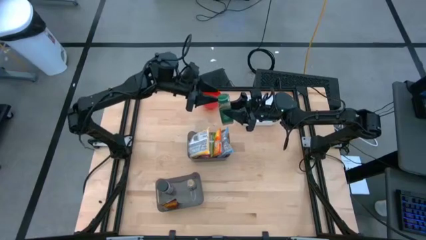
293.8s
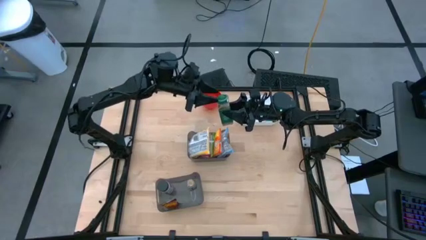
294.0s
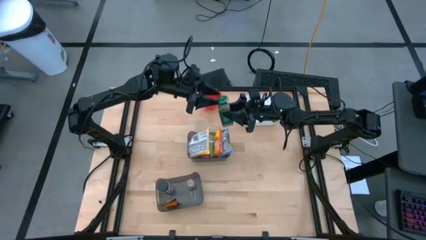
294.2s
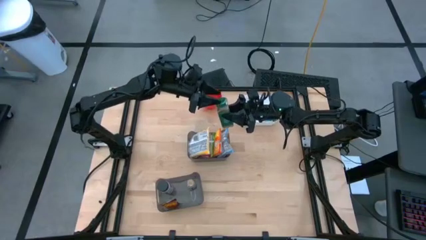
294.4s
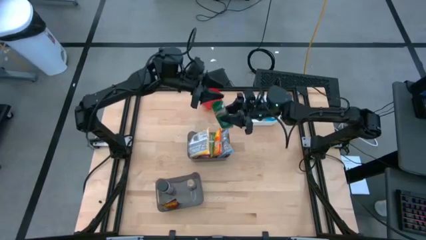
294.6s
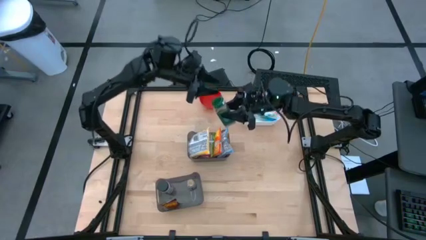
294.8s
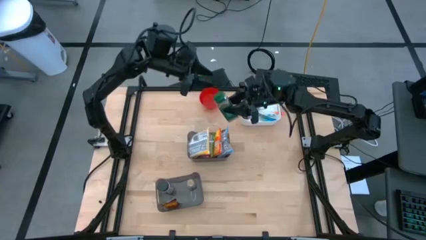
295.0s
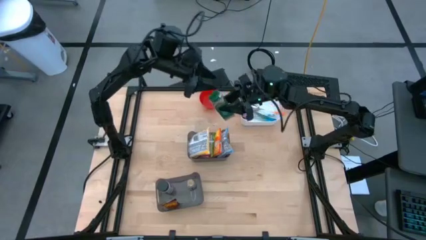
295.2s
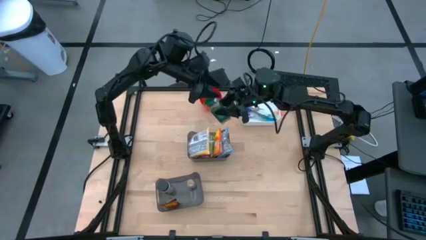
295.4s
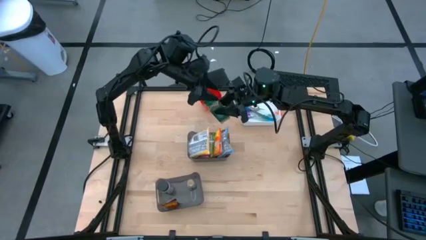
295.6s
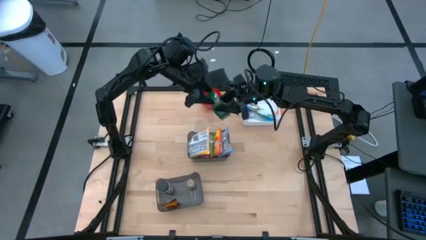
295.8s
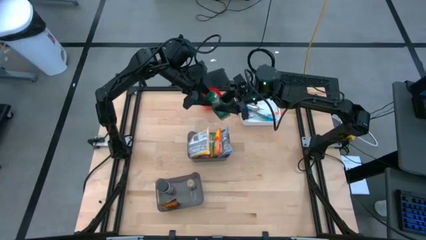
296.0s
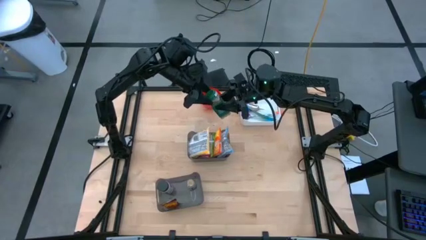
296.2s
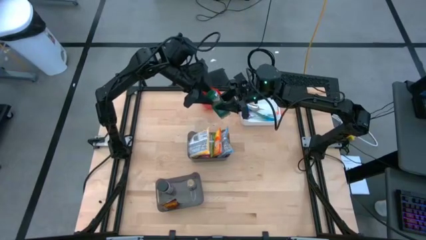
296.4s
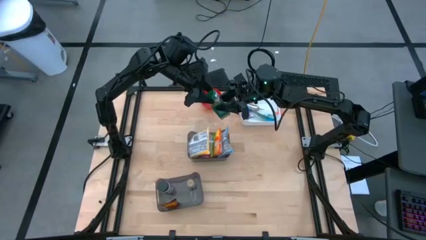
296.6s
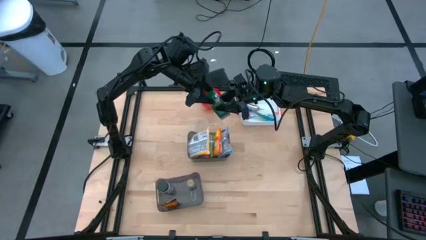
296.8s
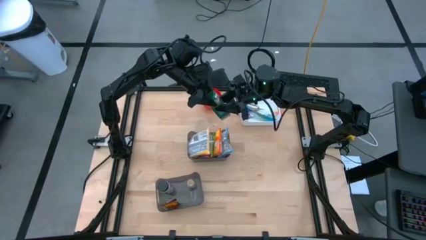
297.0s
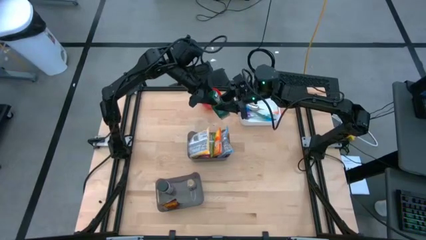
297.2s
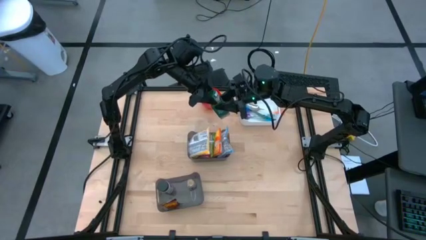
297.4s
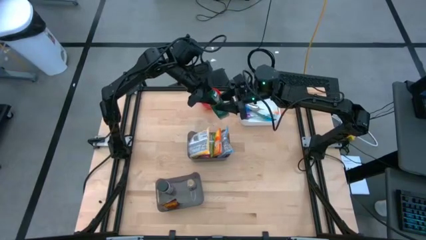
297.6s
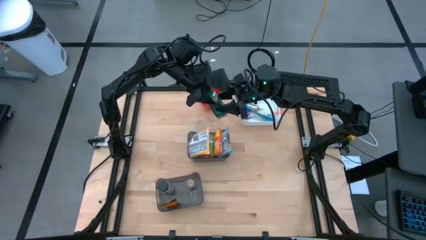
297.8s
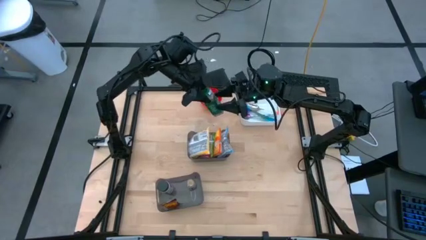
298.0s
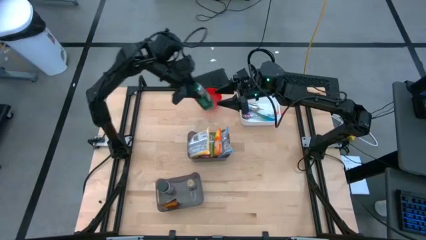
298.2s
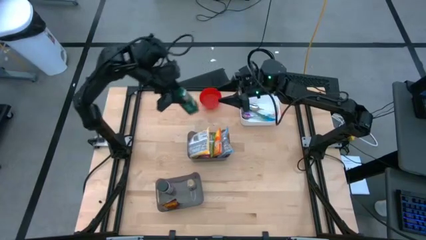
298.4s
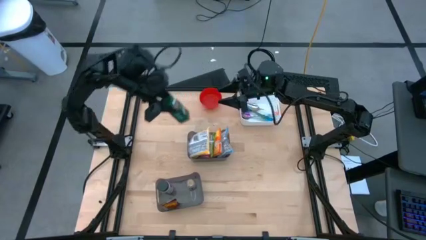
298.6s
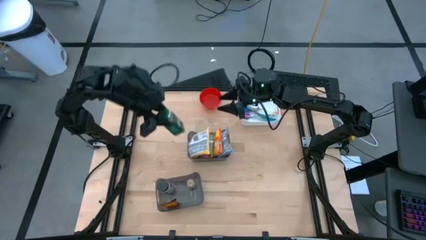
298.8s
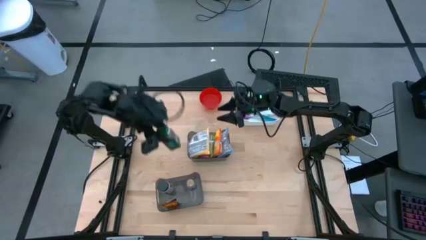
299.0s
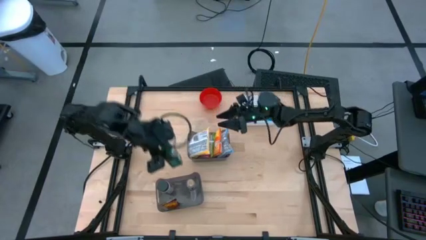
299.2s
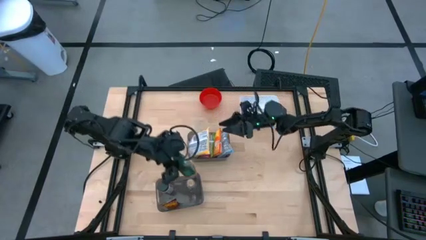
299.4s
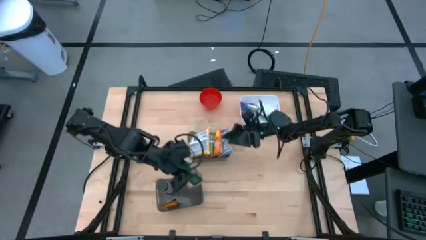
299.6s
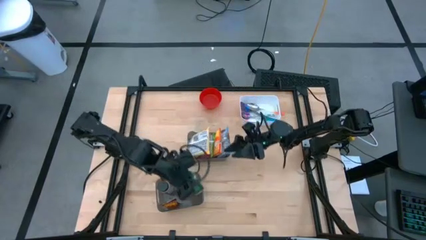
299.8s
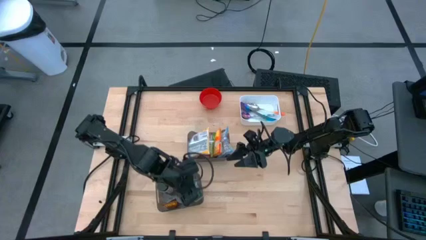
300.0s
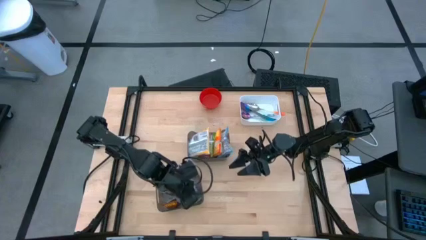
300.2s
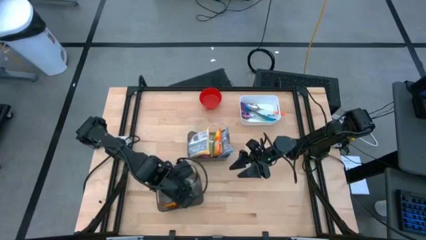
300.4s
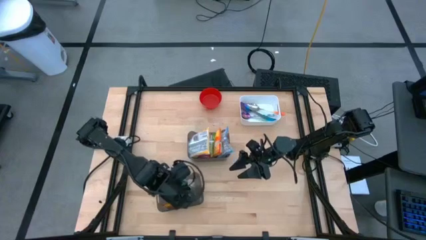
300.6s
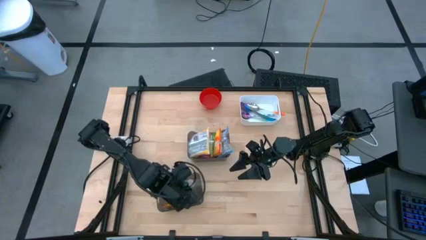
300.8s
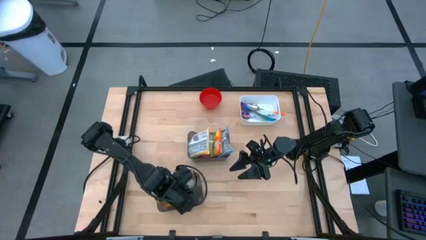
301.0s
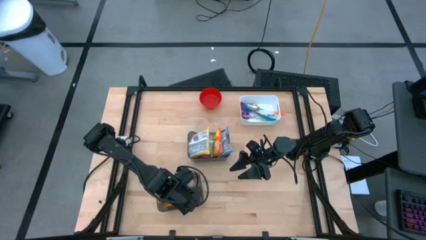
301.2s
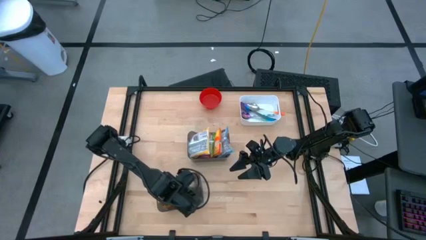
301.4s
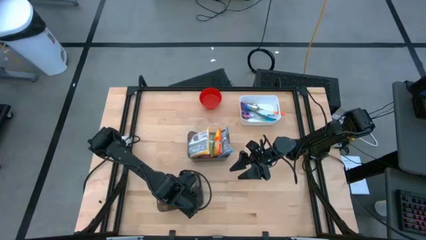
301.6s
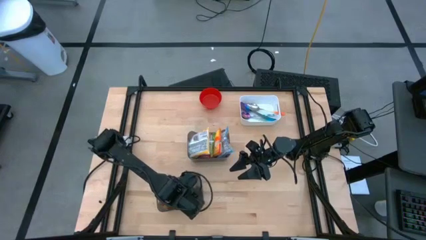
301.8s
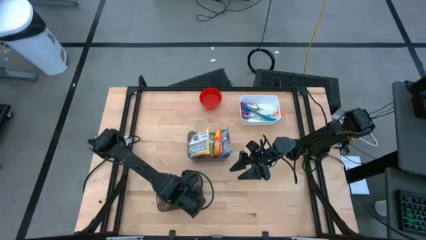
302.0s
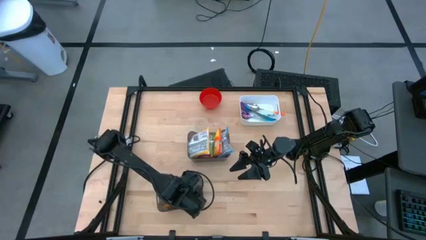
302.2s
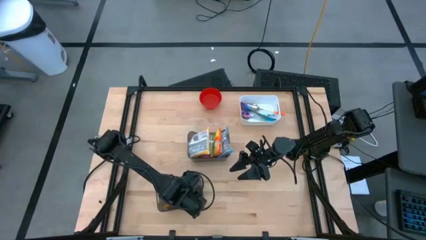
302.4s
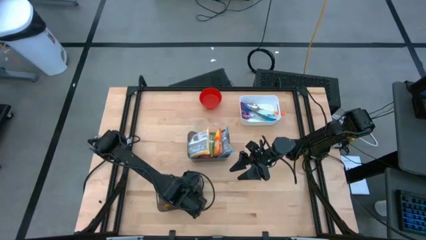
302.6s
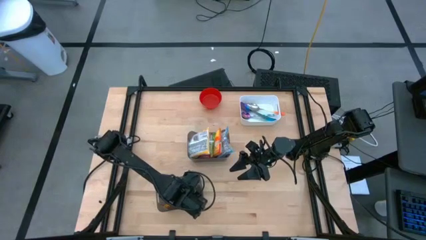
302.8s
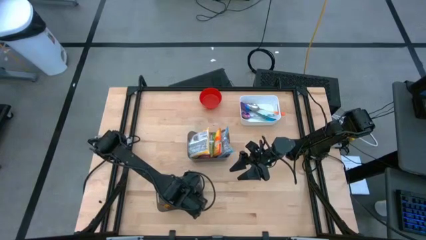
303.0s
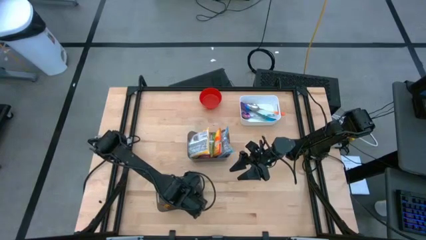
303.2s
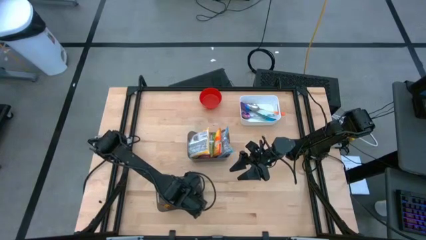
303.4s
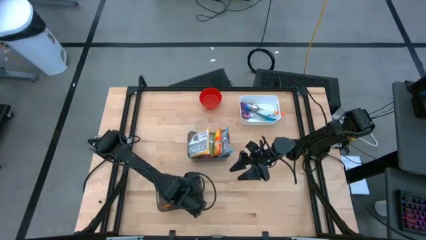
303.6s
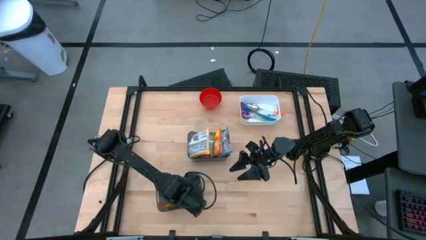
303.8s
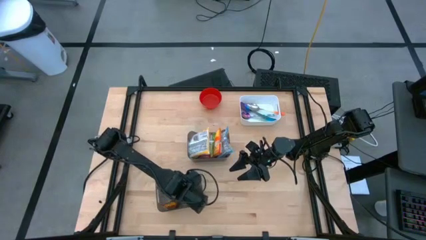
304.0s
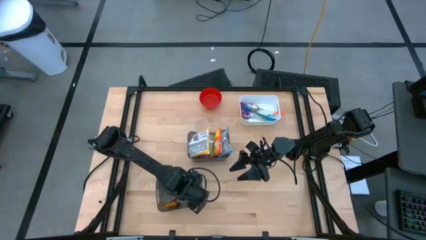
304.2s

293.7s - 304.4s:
Task: Pick & Place Food Item
Put the green seasoning bottle into the bottom black bin

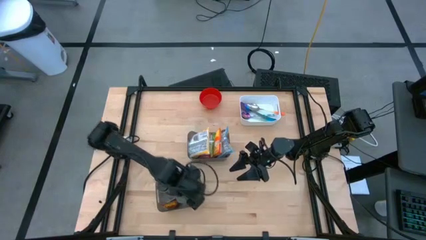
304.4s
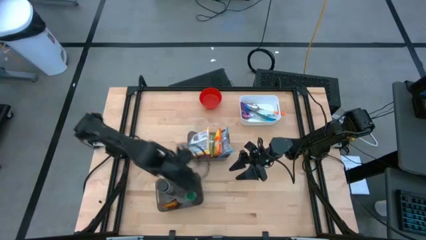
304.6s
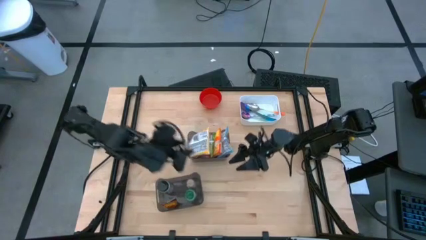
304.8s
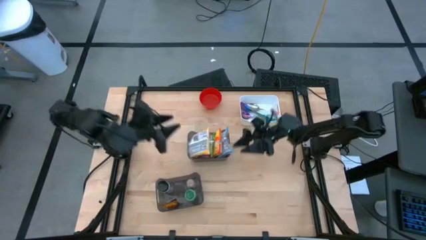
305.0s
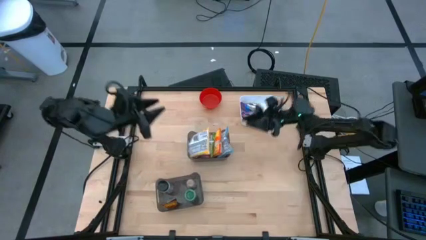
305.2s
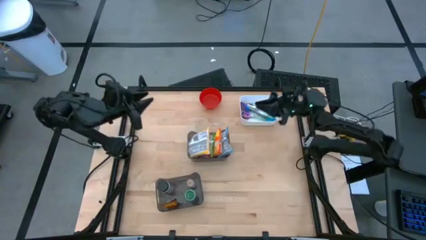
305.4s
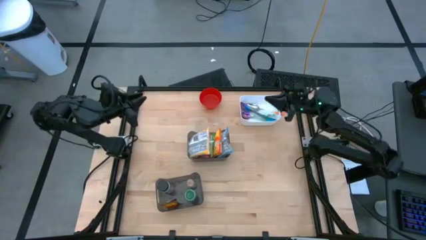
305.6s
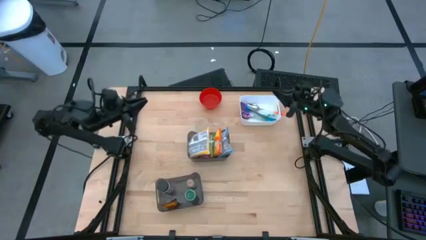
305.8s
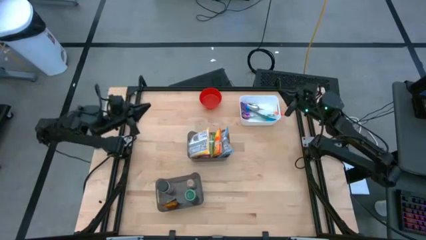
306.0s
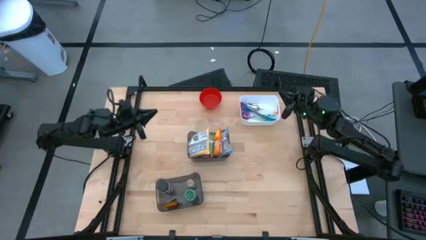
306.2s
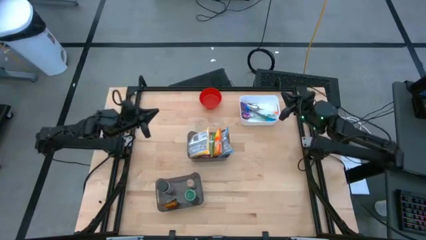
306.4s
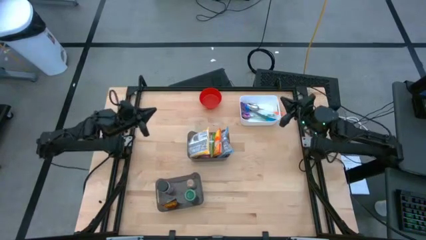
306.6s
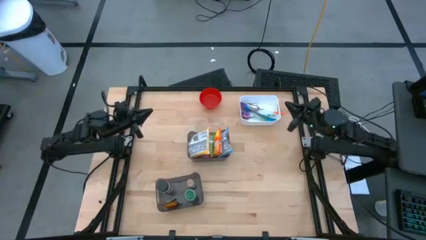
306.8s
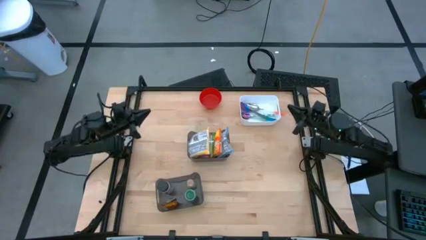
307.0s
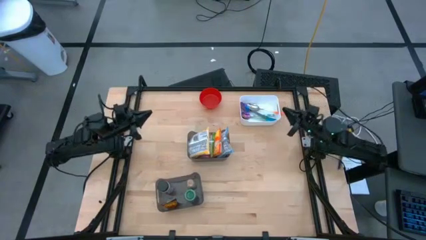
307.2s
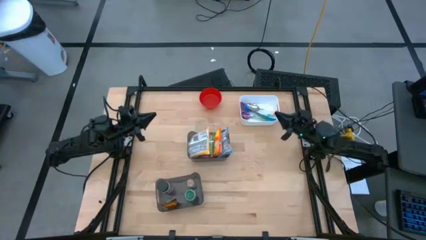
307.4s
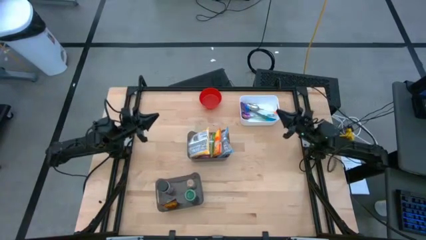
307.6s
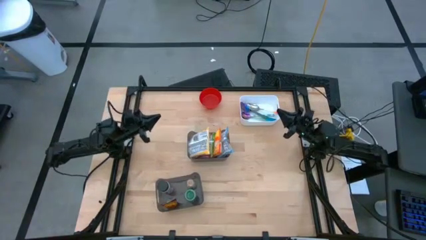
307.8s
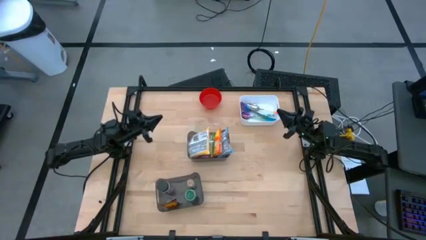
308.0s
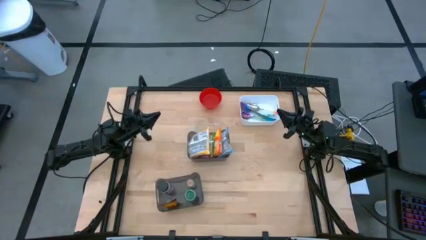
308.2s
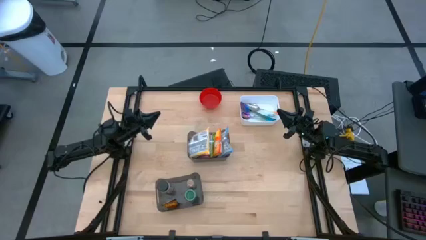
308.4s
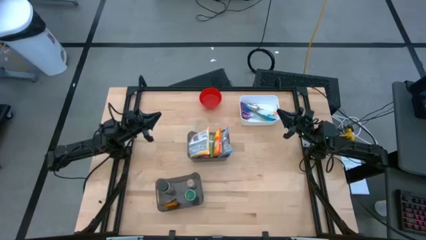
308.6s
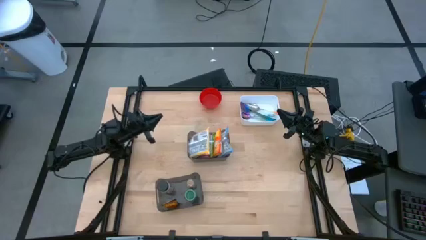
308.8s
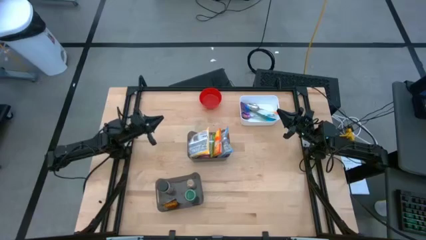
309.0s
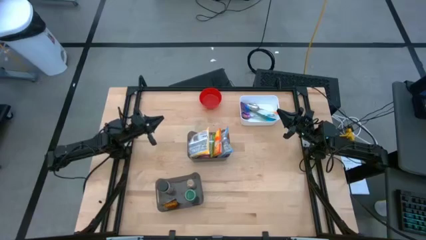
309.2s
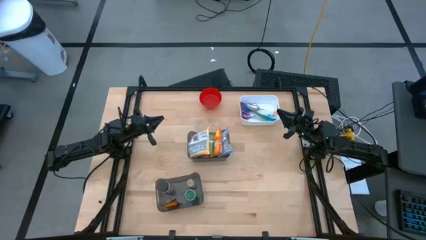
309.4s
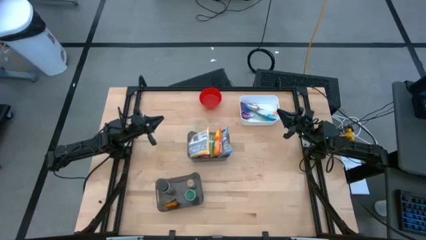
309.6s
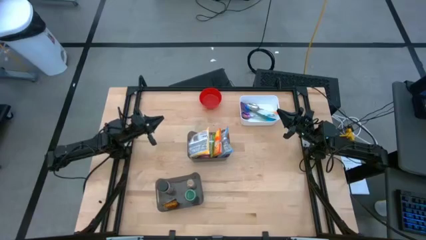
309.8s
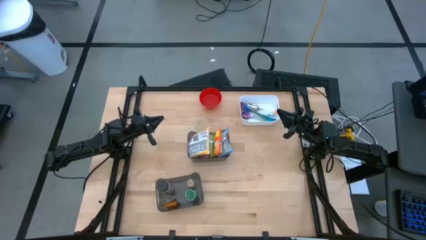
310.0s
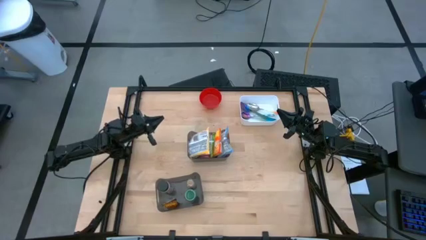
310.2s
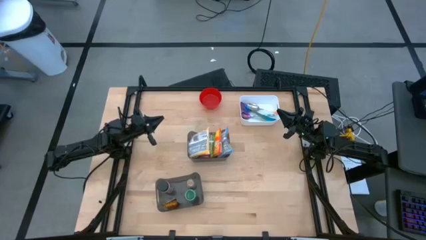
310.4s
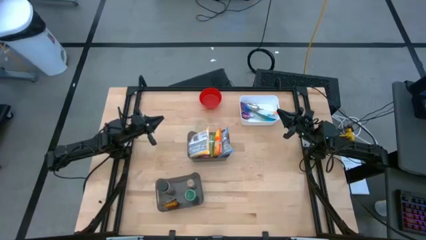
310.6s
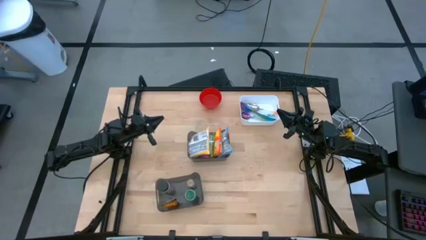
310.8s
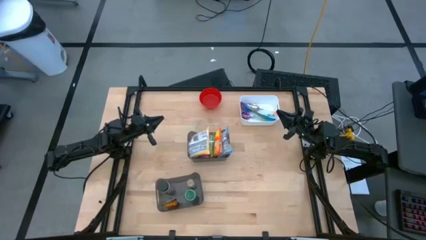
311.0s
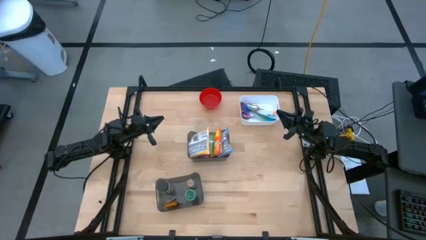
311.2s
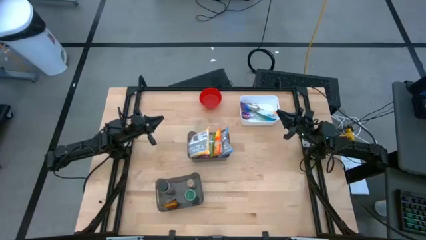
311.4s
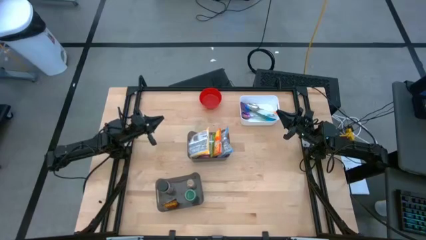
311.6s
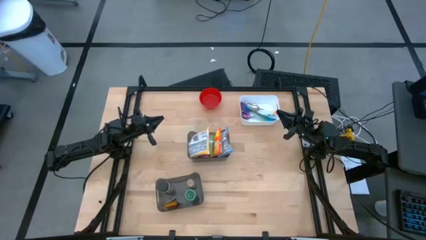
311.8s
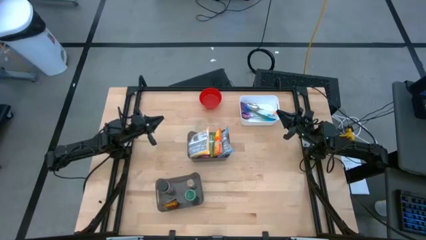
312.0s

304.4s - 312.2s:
Return to Home Position
